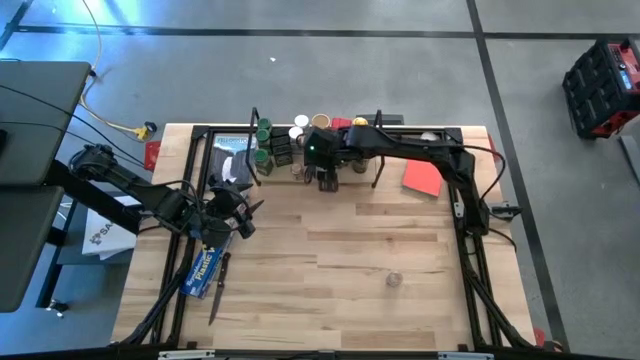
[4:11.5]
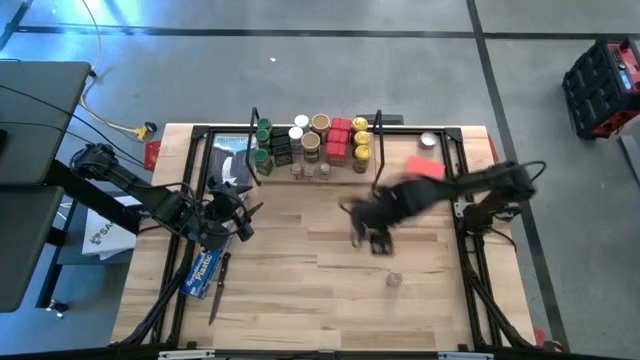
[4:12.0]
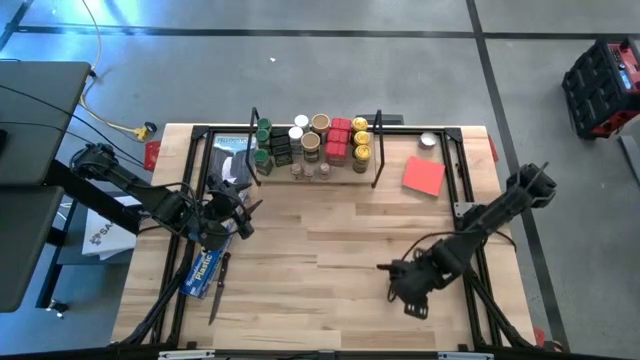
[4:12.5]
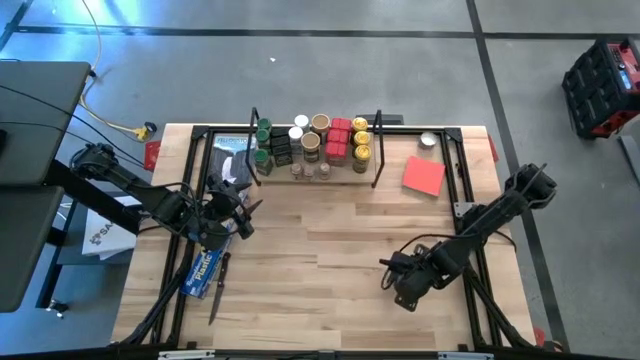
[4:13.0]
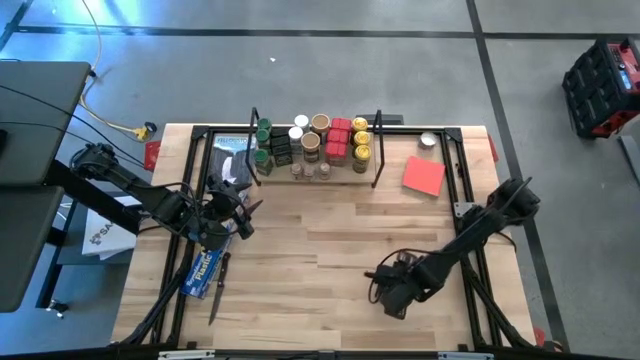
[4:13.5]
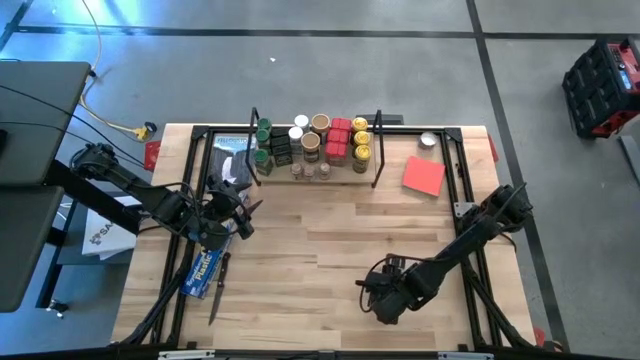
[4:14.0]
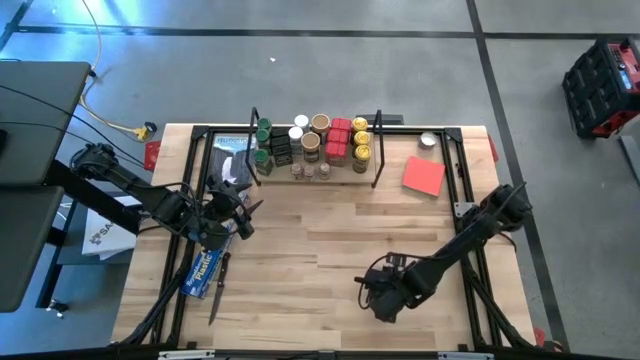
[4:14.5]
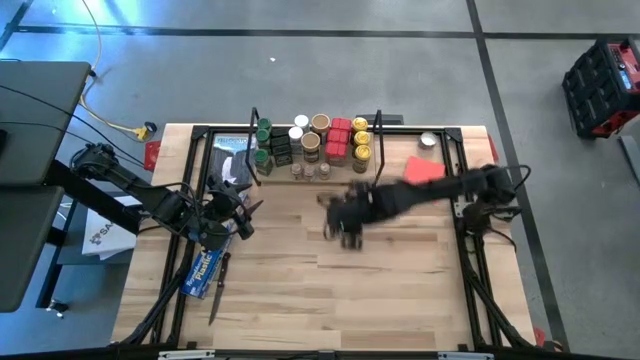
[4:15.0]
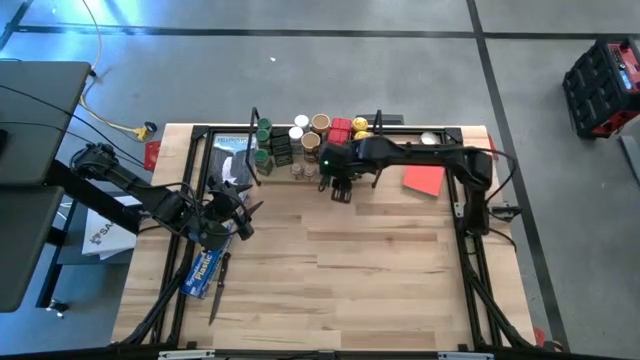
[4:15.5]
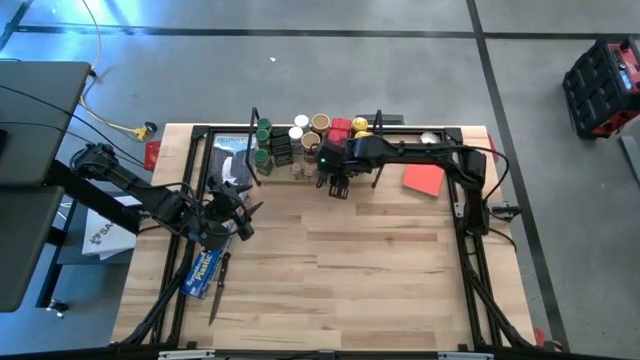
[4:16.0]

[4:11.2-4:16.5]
Task: Shelf spices
Put the brown seasoning bottle on the shelf and align it with the other brown seasoning bottles

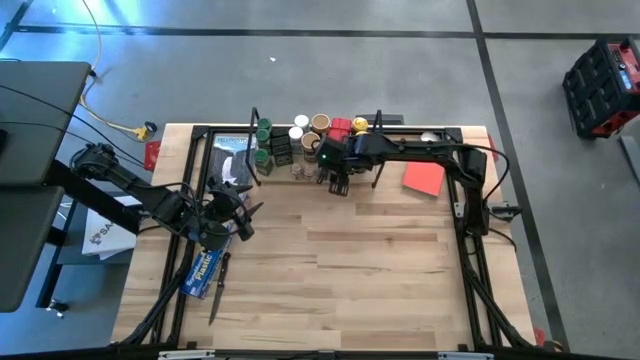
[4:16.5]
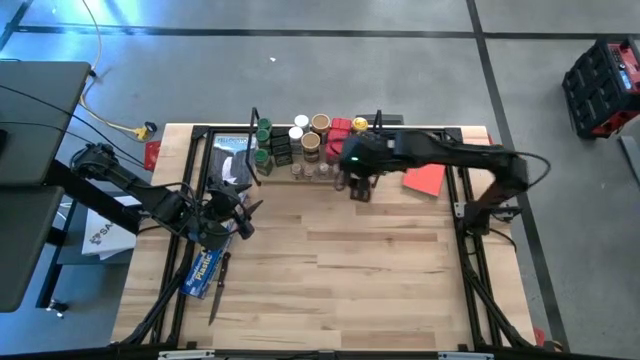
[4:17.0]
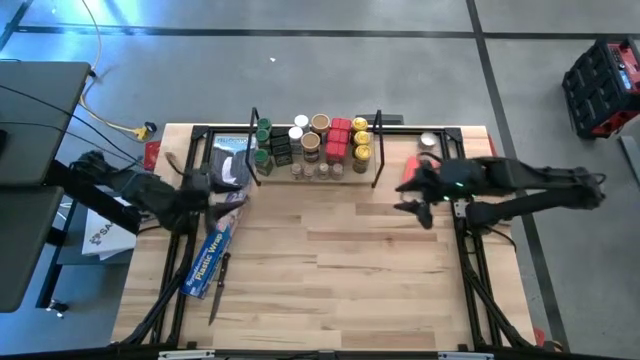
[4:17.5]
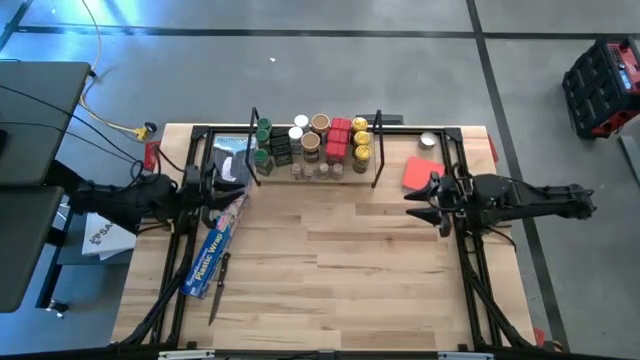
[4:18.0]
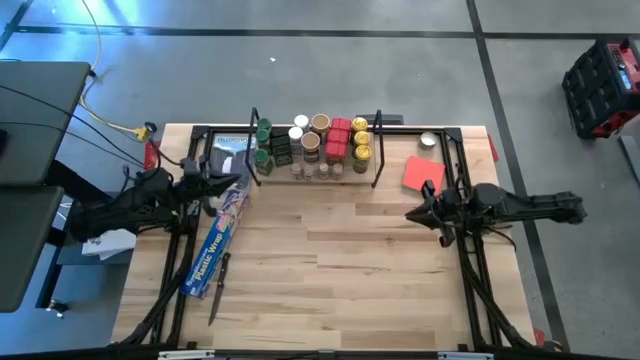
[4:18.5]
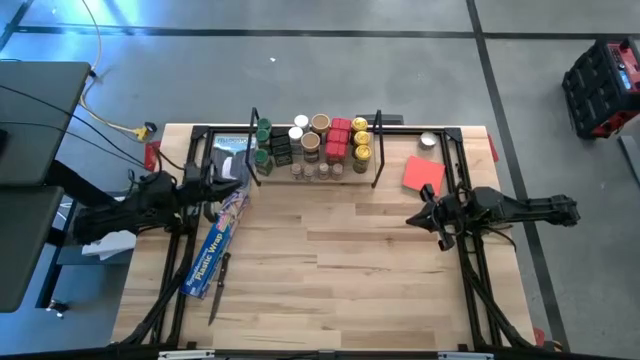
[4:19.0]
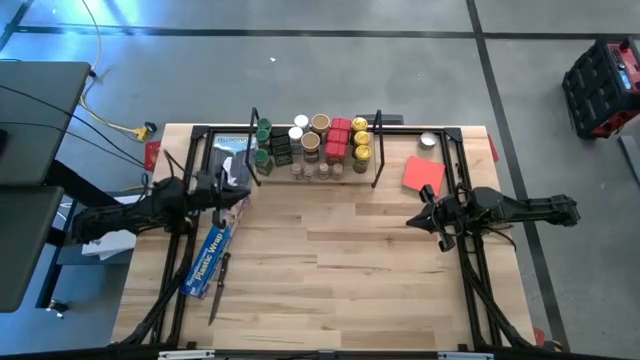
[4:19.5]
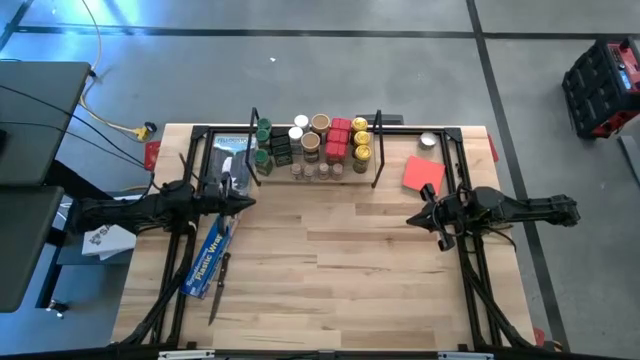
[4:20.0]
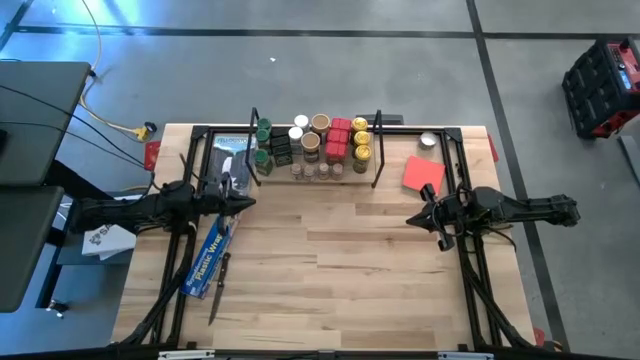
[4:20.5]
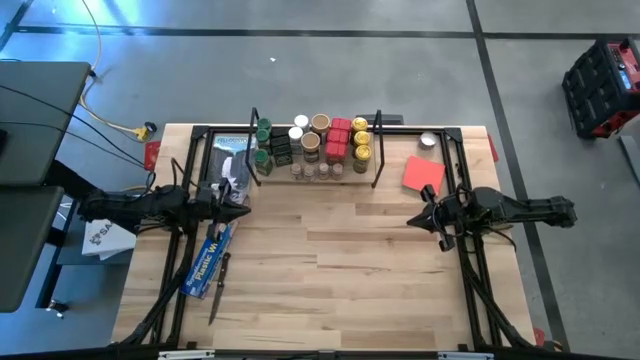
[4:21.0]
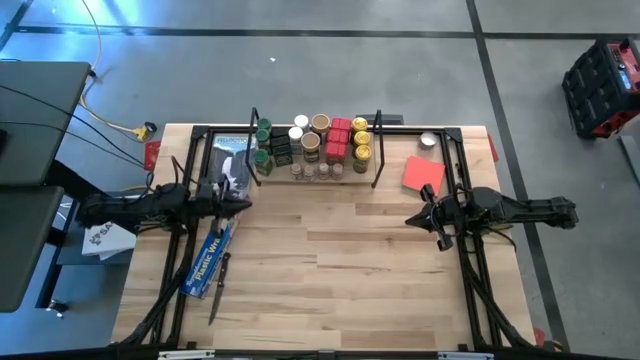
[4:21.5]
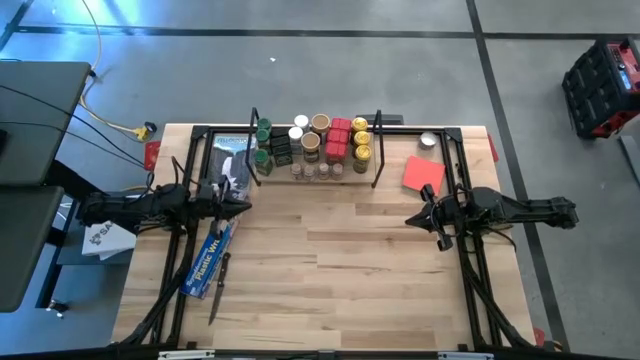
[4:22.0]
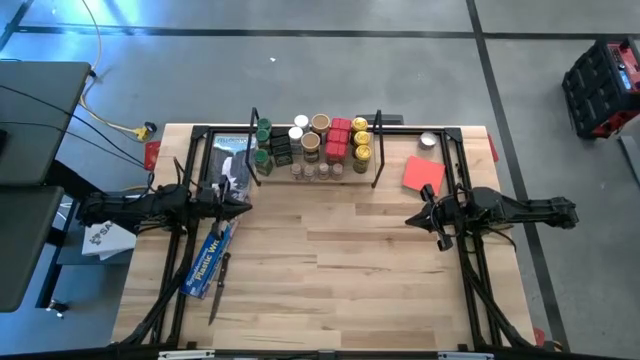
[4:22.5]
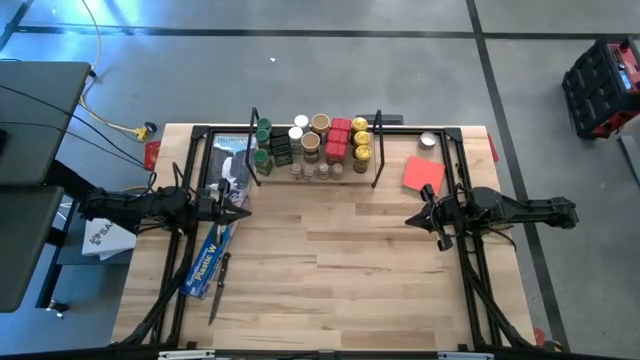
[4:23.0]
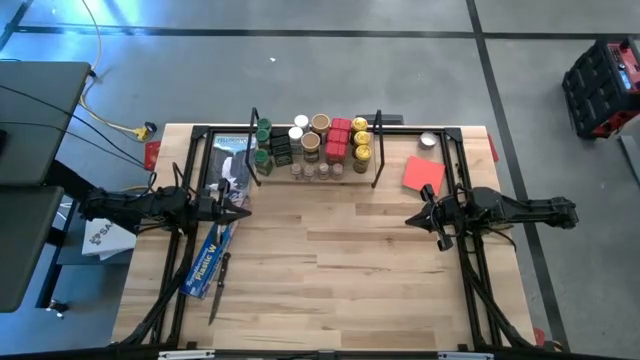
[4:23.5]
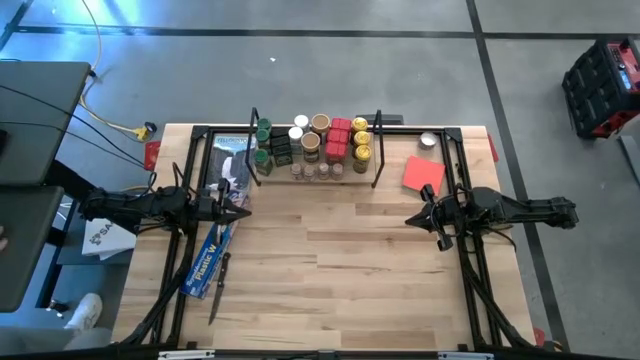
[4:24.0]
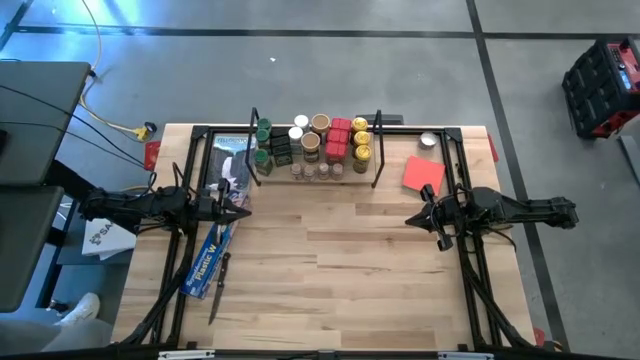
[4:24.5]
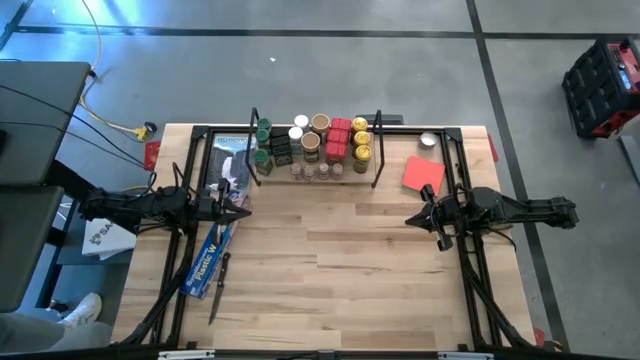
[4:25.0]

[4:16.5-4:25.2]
Return to Home Position

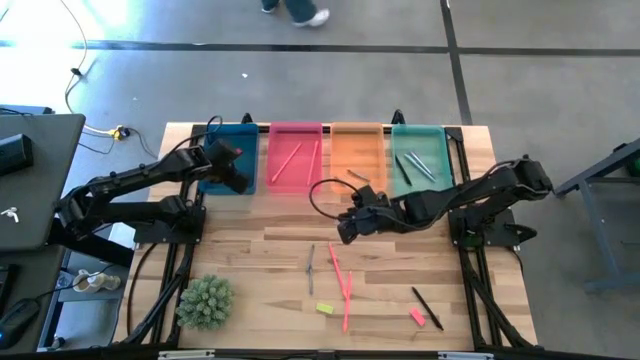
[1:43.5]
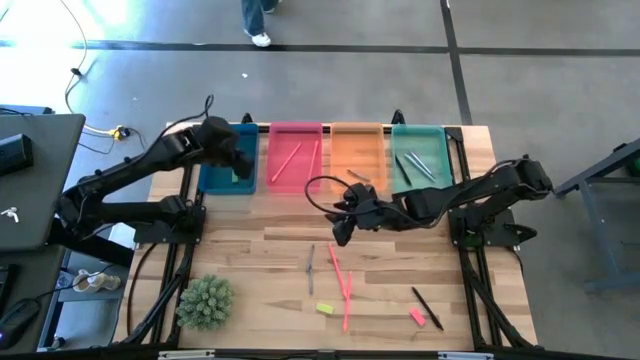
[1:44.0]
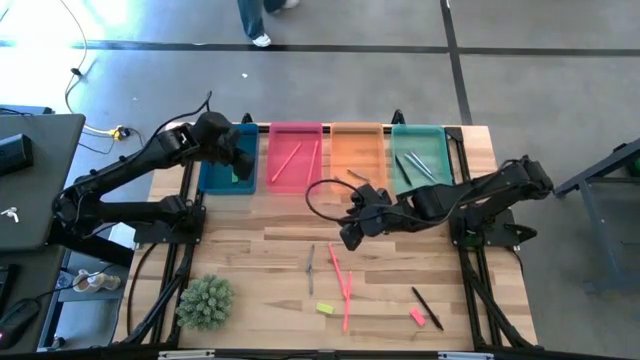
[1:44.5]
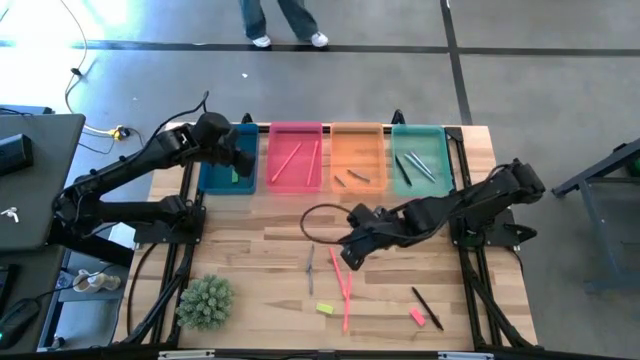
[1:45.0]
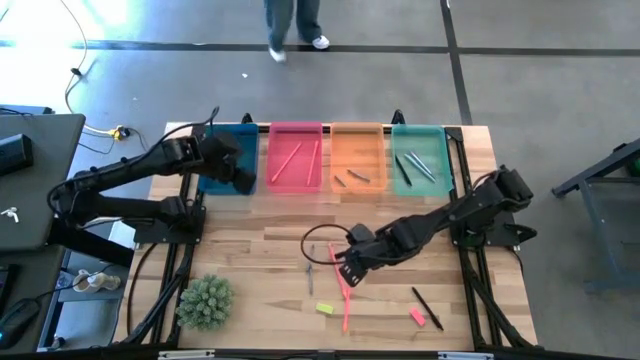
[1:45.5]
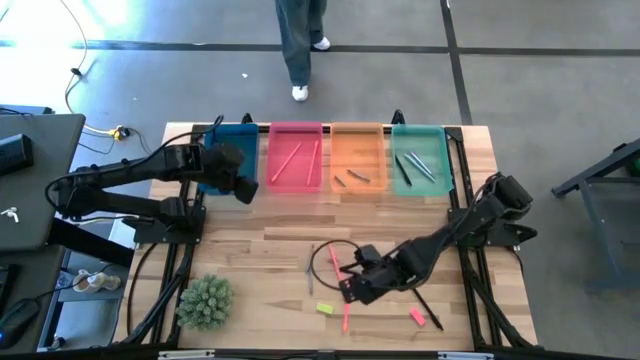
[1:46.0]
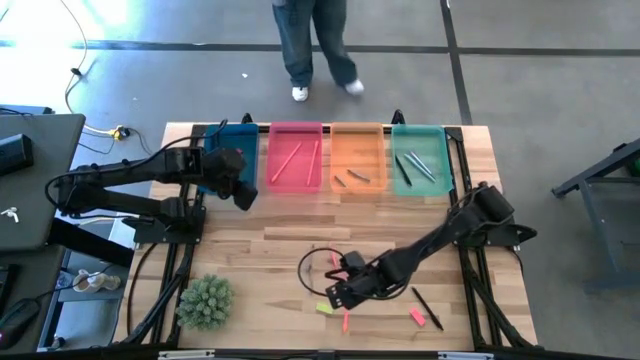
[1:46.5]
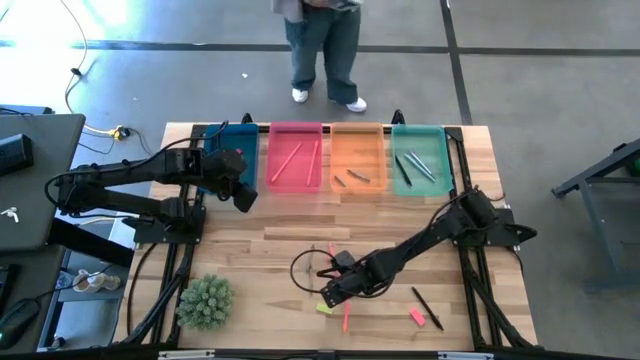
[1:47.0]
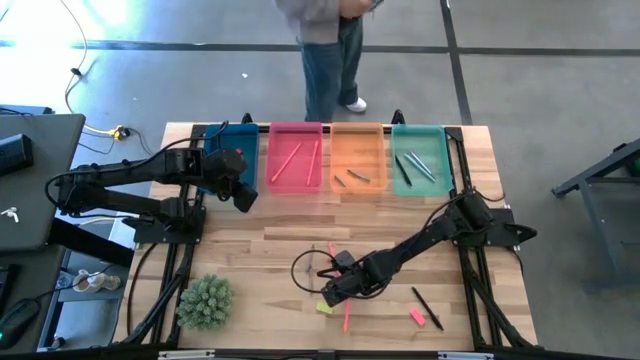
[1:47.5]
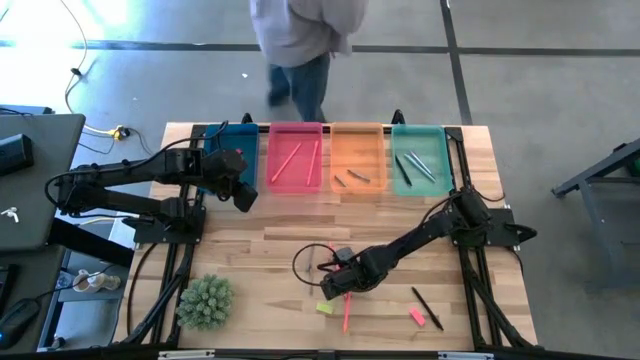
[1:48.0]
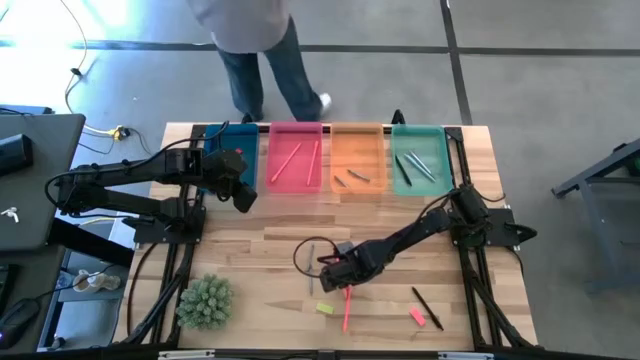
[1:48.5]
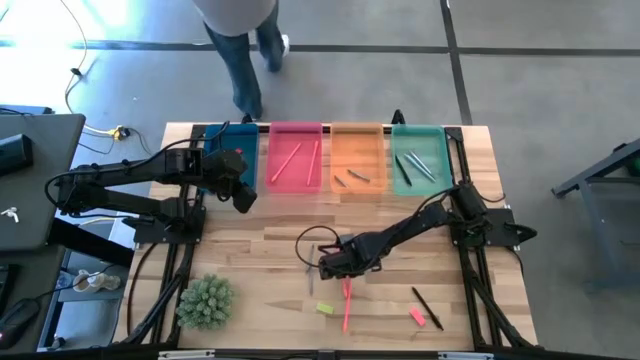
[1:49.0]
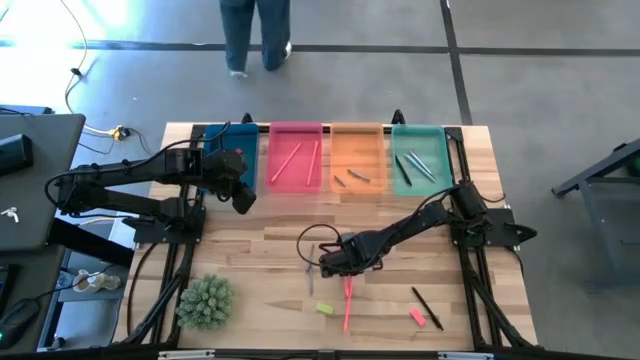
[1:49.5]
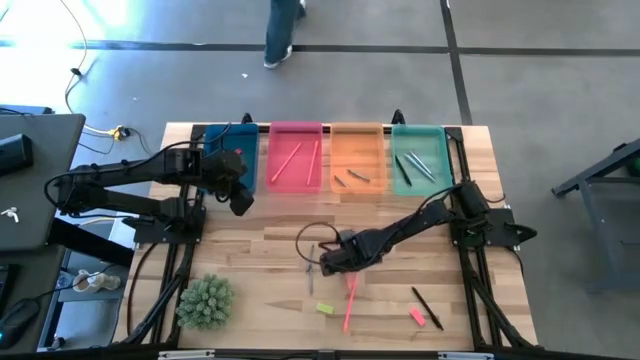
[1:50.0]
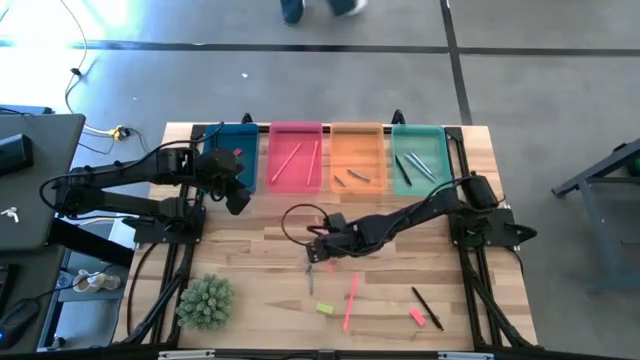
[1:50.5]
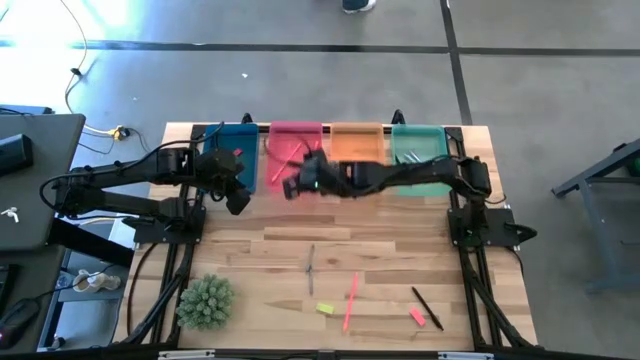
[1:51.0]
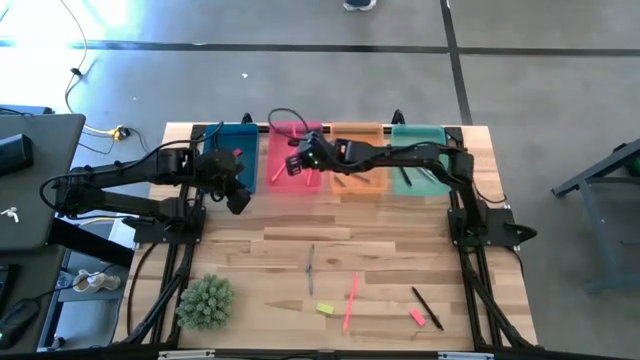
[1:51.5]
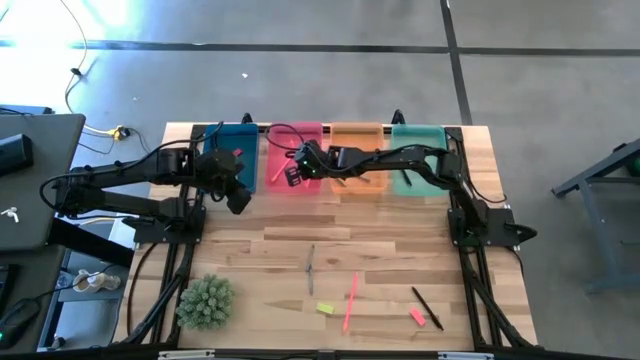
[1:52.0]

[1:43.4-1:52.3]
Task: Sort crayons/erasers/pens/pencils in bins
Put the pink pencil into the pink bin
